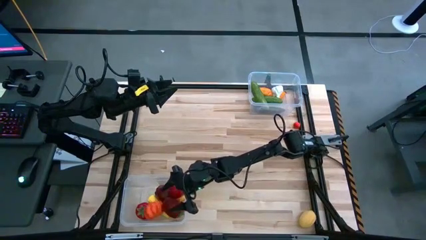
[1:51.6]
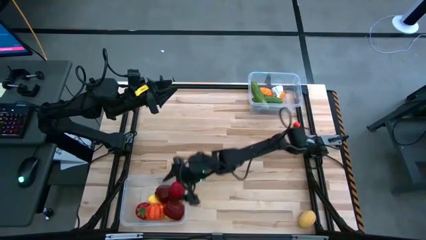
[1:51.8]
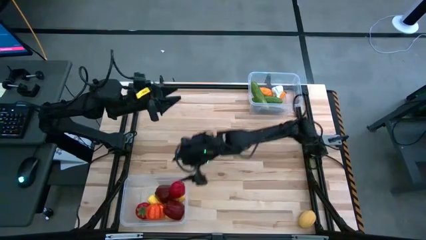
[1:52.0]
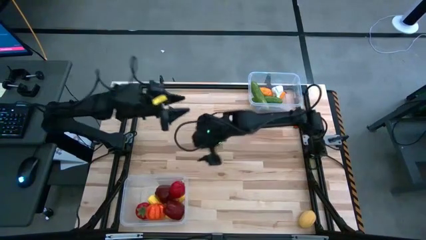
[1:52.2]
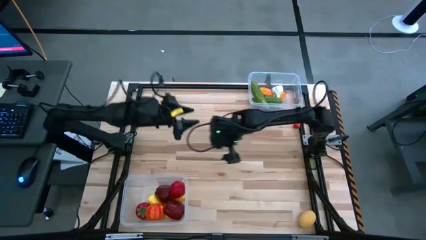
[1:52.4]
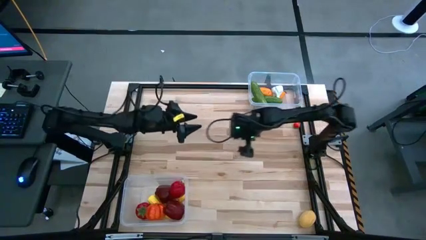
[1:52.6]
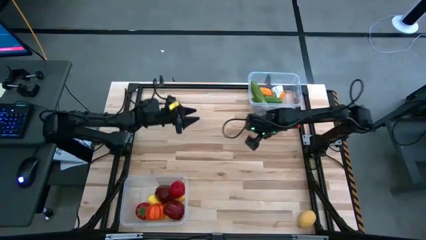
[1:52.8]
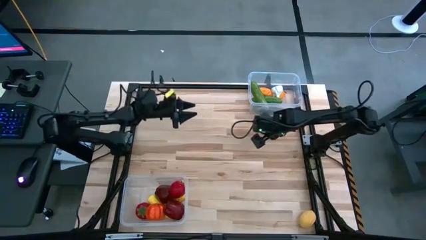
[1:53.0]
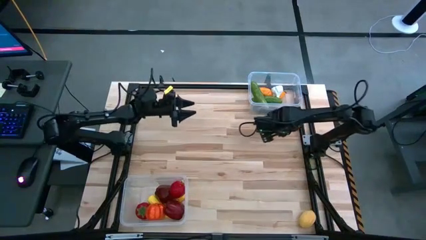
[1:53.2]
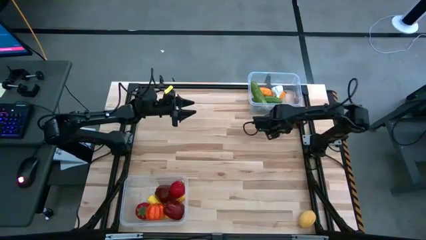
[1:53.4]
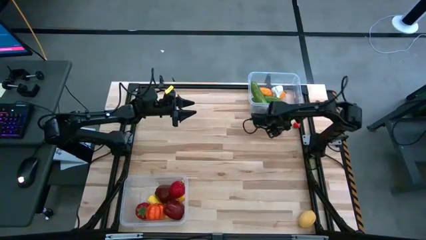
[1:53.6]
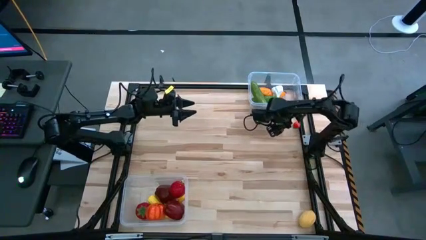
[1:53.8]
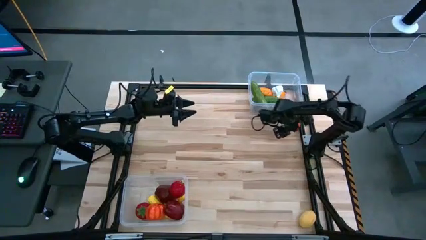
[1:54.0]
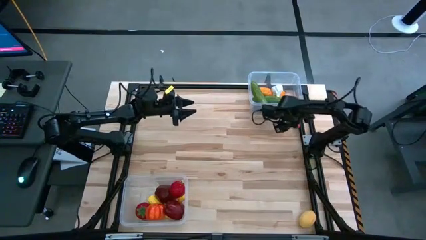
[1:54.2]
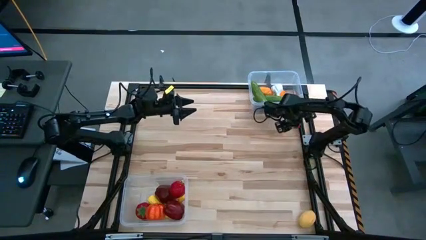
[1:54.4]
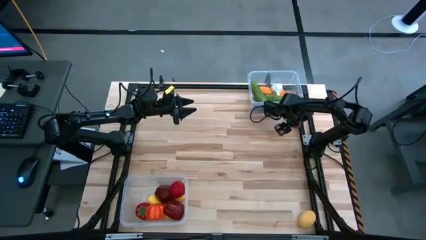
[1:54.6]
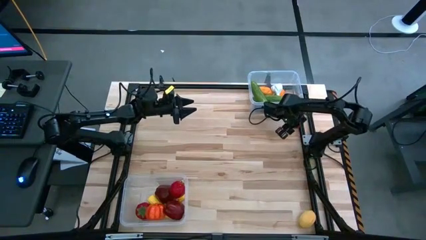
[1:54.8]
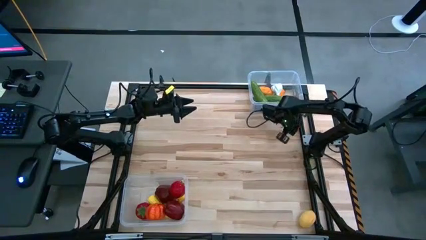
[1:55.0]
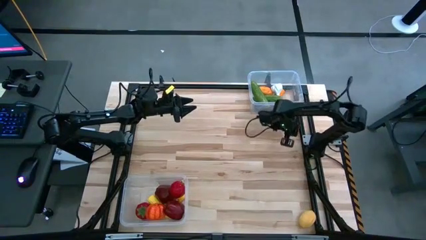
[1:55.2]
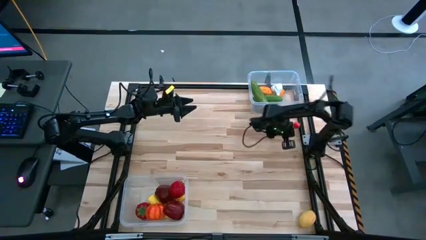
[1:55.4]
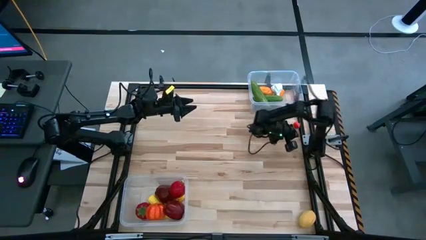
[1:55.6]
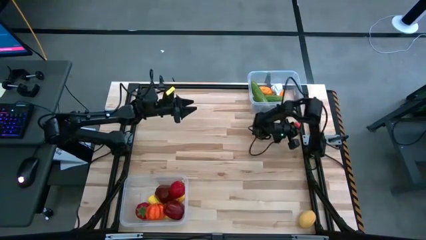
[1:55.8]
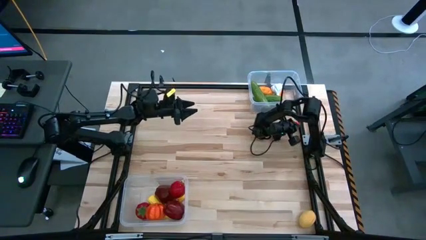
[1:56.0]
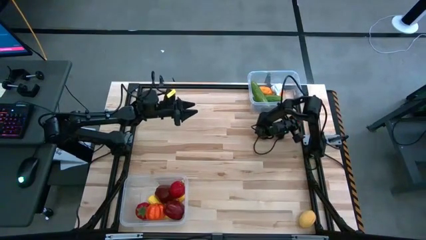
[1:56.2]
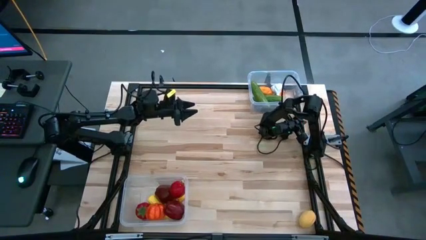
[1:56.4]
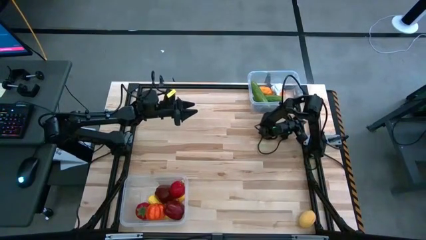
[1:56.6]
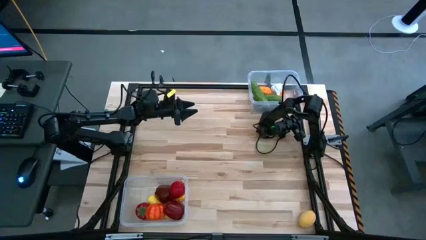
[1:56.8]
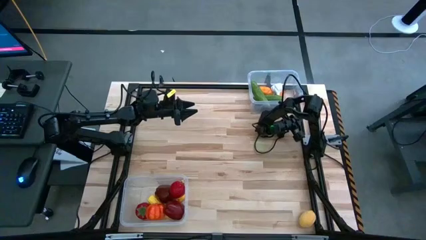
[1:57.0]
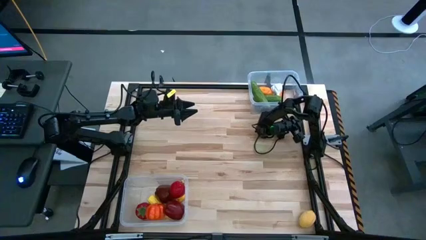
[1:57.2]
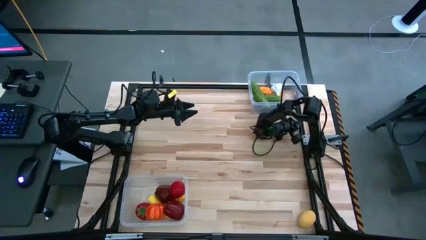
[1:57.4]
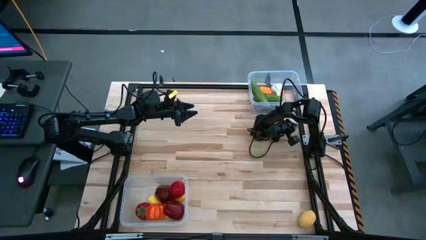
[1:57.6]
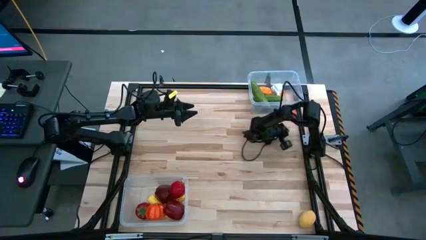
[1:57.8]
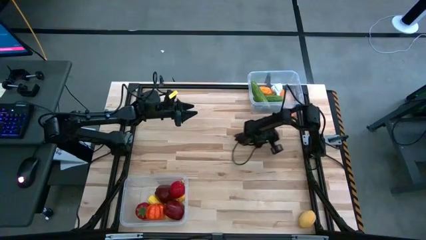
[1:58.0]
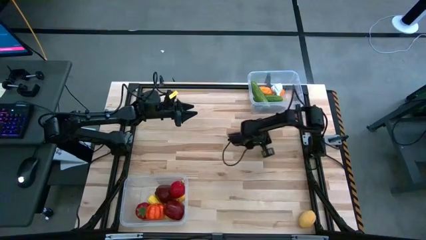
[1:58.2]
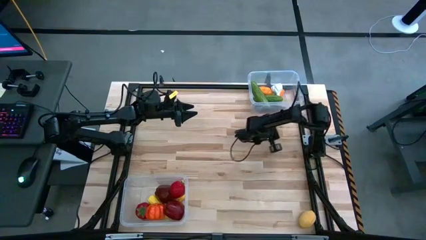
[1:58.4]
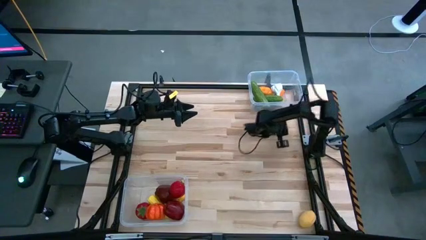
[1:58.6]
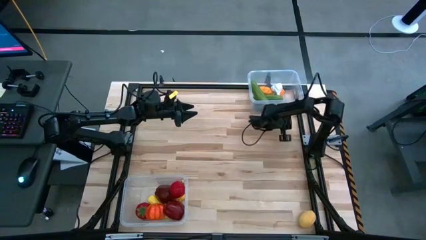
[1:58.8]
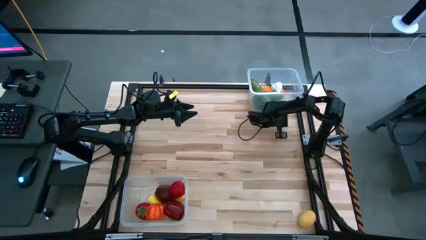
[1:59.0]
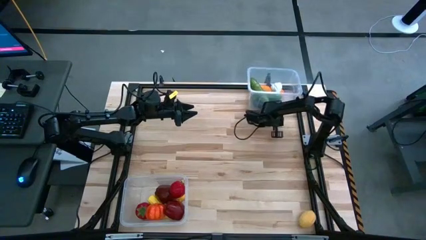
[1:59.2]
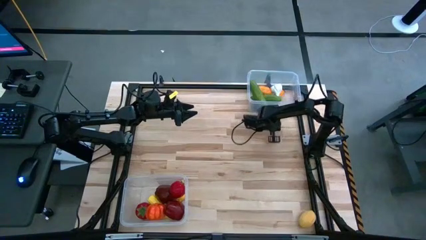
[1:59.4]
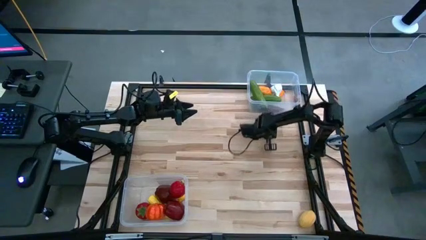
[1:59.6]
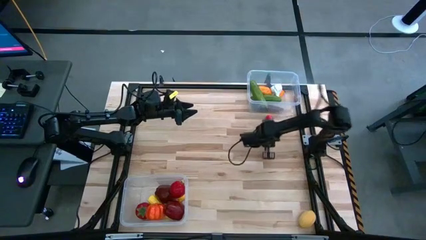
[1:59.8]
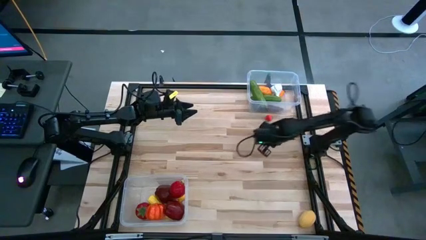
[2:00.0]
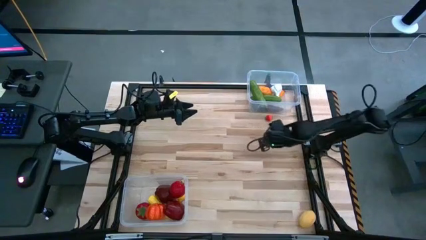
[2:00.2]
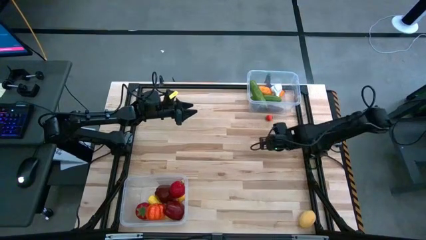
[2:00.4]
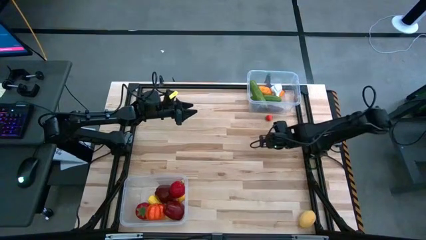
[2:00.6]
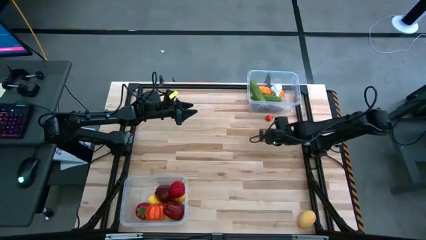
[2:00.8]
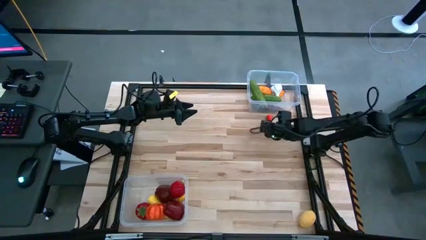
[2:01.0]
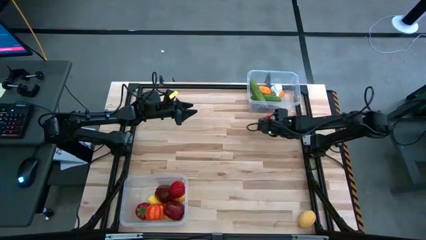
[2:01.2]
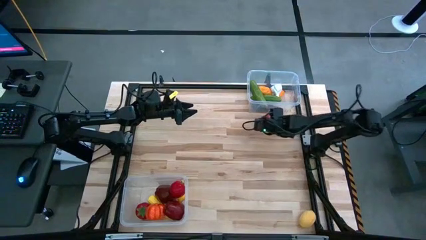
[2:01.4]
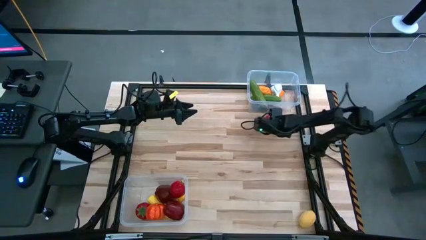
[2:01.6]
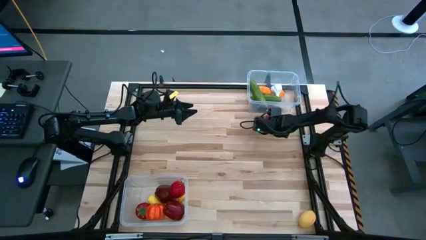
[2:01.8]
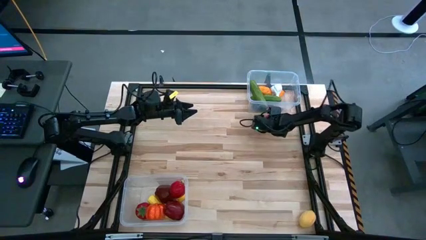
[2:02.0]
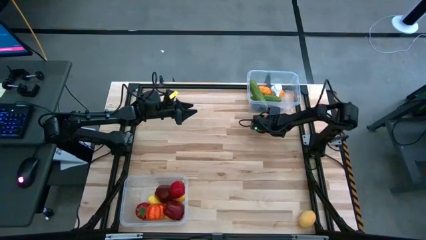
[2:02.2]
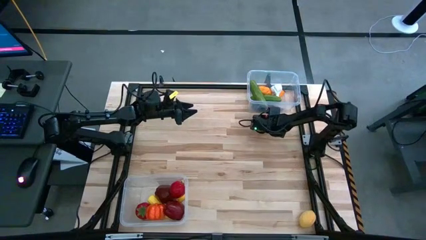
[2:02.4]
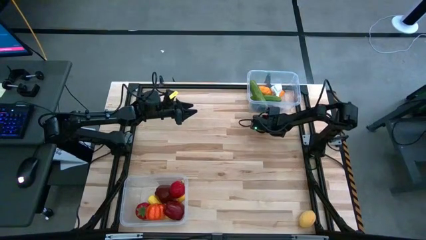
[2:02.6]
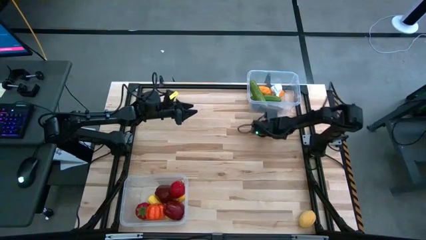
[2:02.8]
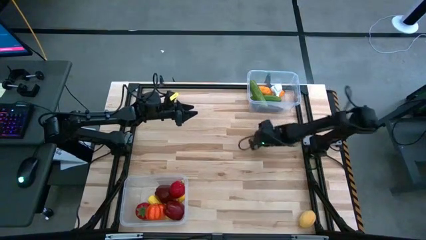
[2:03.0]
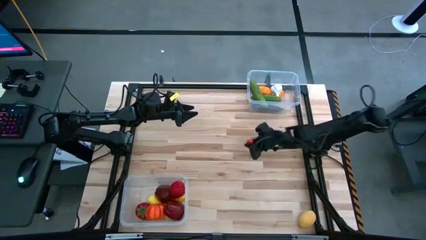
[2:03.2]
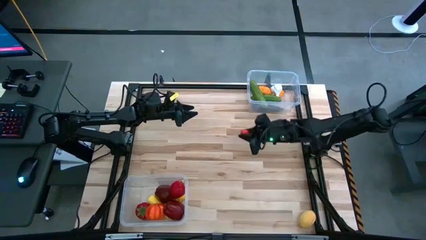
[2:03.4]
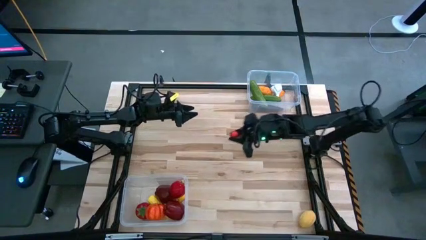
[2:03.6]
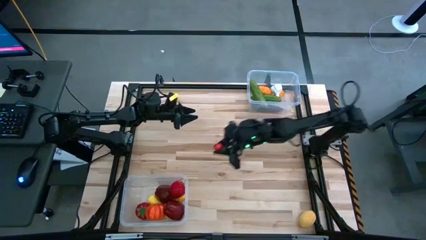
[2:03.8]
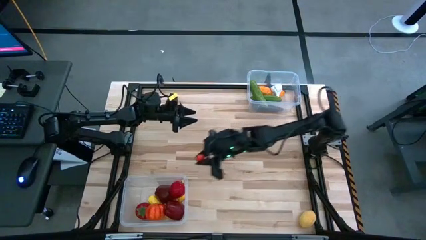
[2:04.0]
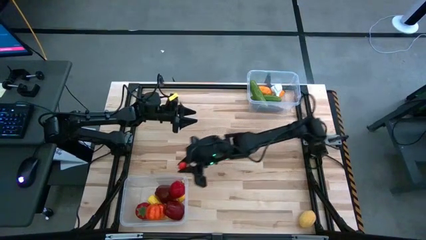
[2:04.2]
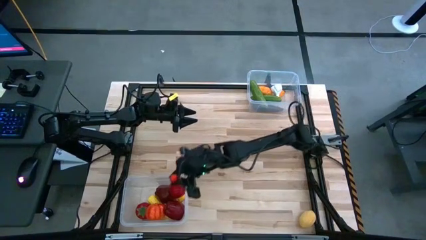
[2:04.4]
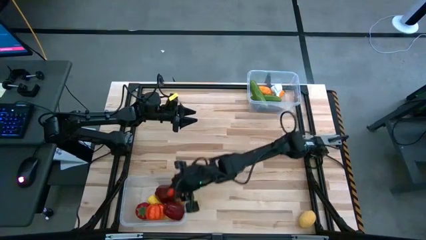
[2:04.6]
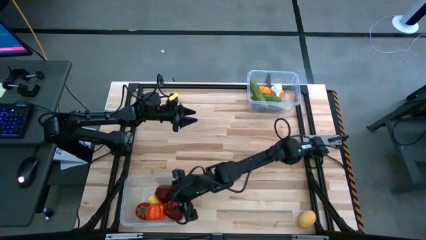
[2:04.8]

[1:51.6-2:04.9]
Task: Sort produce into baskets
Put the orange tomato into the bottom transparent bin

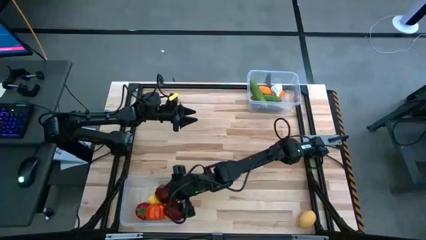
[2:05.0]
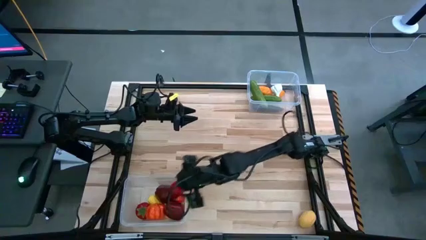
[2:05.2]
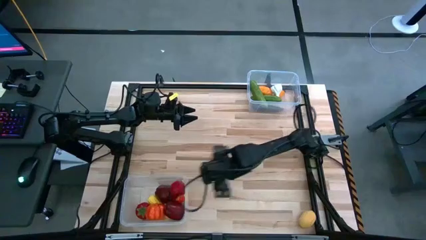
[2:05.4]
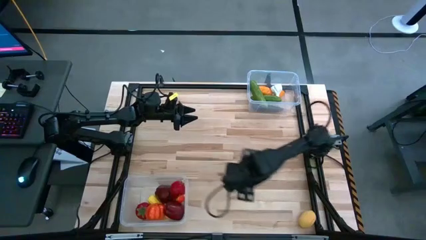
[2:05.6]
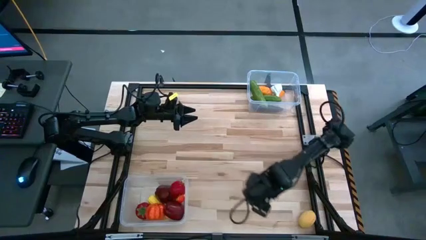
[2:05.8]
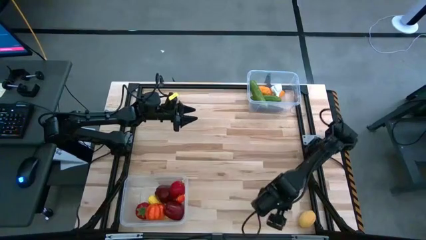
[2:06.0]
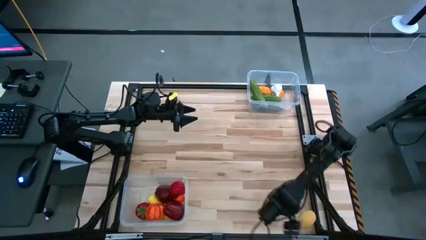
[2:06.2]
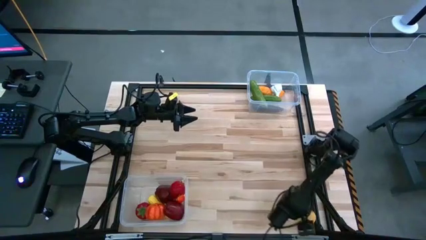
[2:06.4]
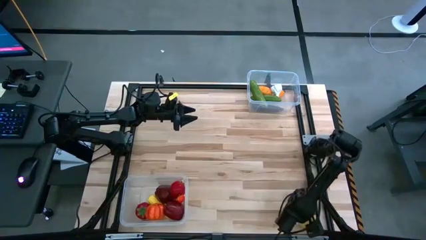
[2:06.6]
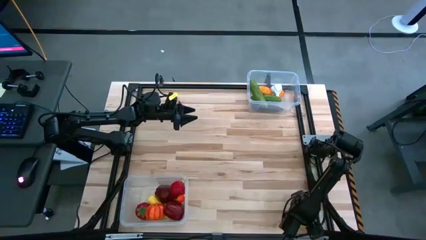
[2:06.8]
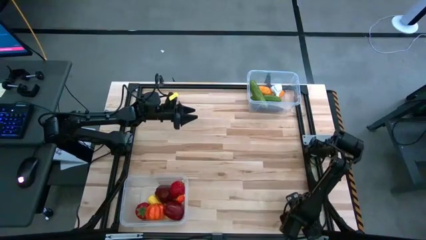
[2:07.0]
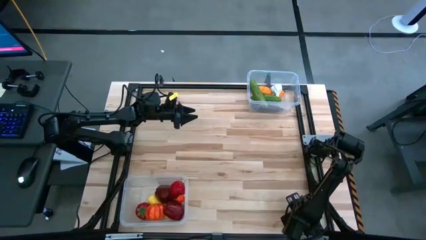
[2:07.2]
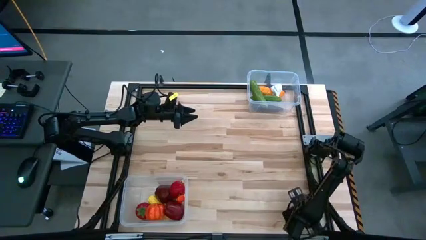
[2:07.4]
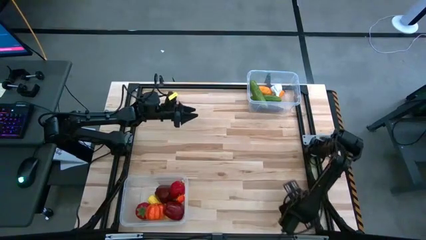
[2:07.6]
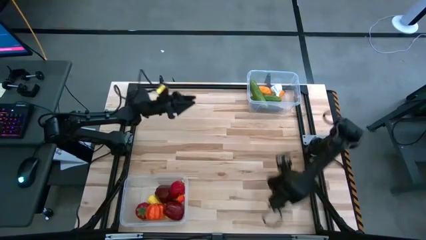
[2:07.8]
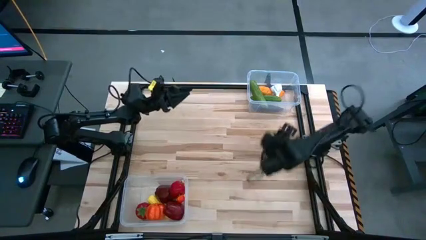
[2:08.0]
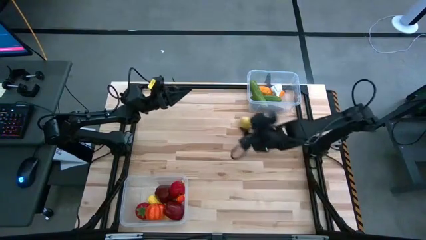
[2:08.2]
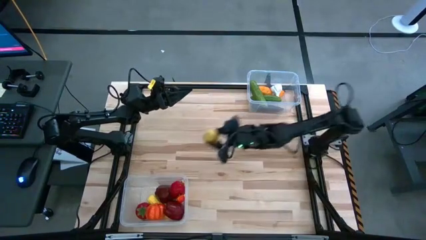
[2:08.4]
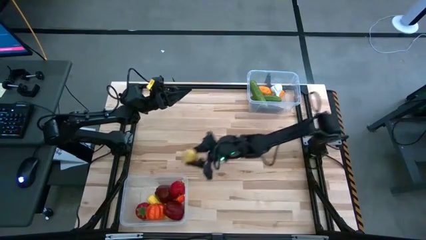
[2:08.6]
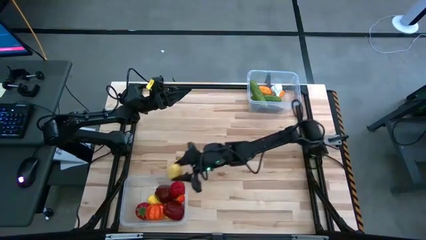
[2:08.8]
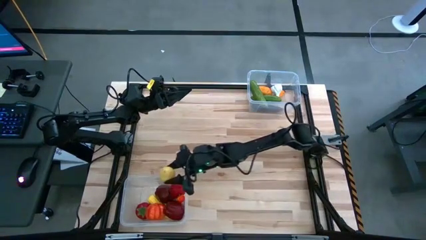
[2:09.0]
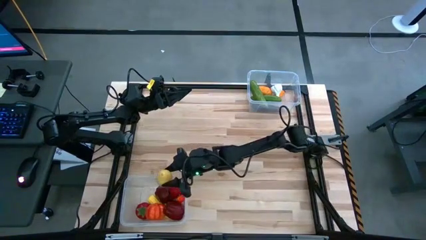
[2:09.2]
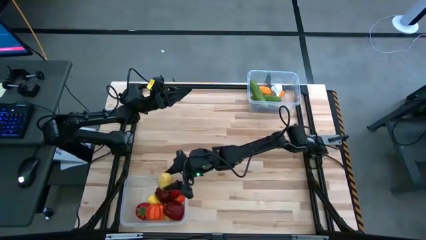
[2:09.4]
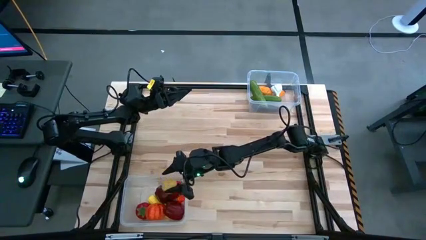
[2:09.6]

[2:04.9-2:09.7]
Put the yellow lemon into the bottom transparent bin
